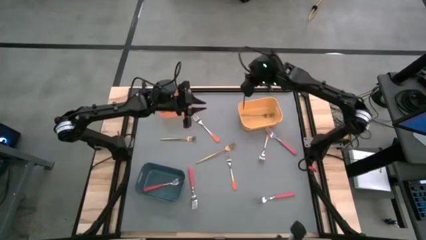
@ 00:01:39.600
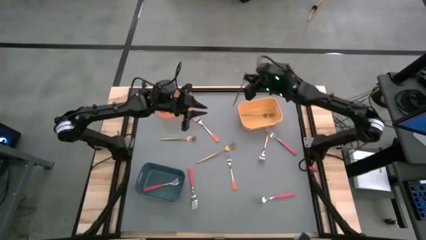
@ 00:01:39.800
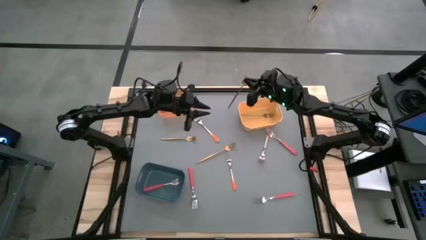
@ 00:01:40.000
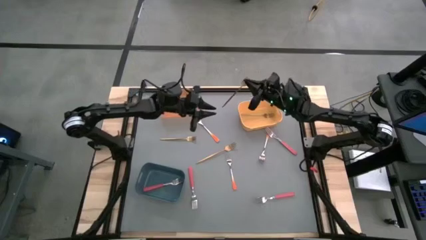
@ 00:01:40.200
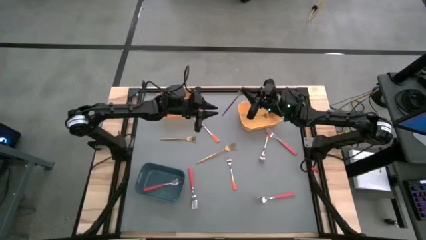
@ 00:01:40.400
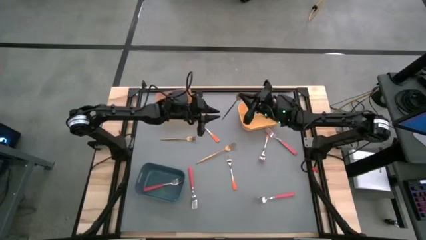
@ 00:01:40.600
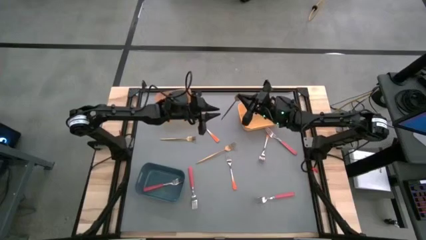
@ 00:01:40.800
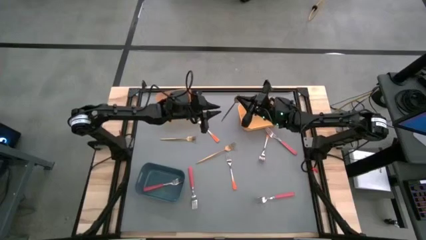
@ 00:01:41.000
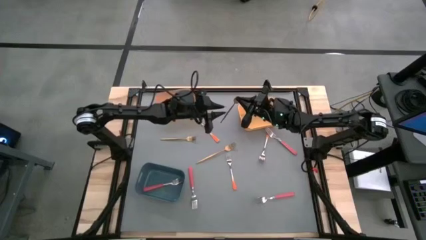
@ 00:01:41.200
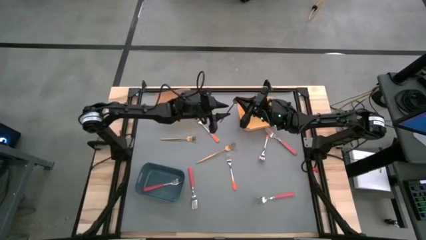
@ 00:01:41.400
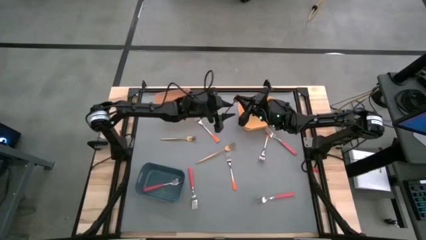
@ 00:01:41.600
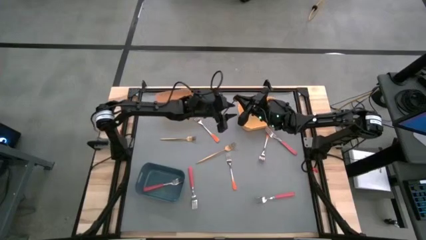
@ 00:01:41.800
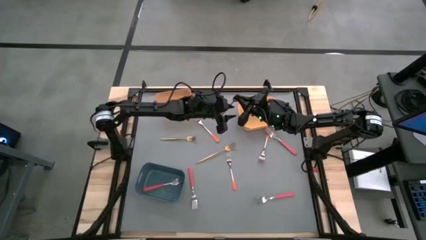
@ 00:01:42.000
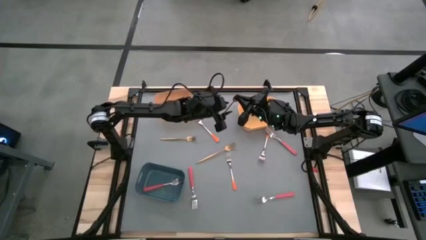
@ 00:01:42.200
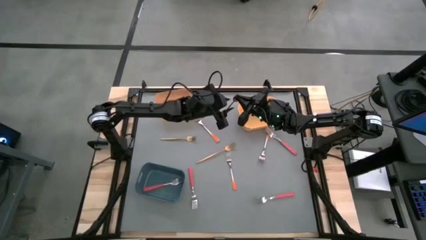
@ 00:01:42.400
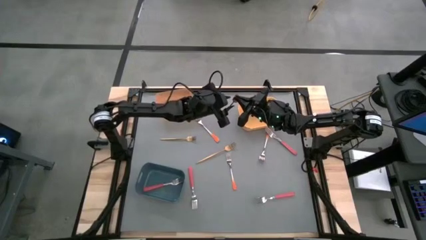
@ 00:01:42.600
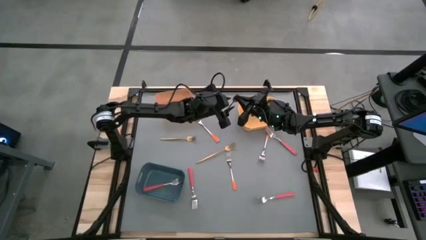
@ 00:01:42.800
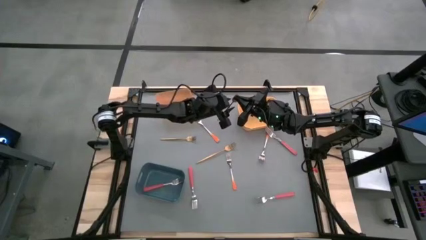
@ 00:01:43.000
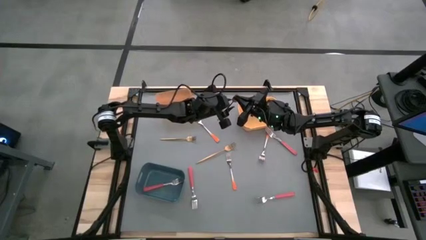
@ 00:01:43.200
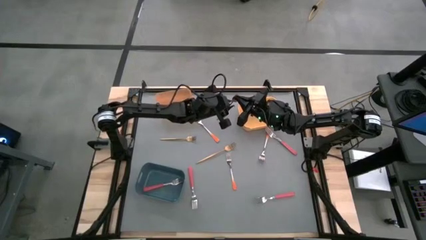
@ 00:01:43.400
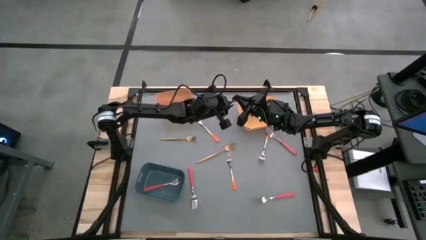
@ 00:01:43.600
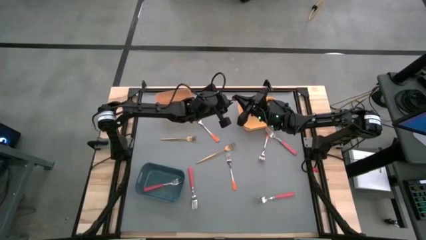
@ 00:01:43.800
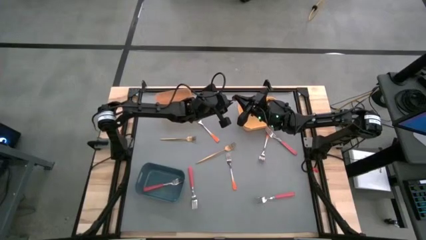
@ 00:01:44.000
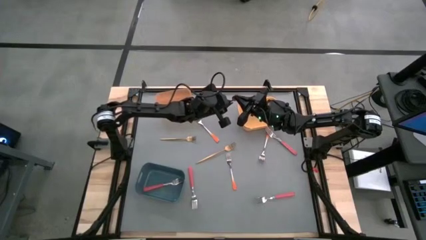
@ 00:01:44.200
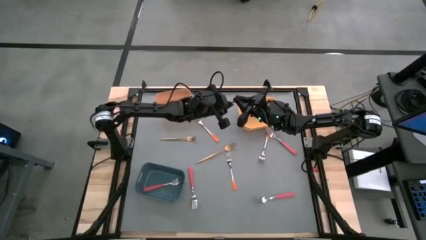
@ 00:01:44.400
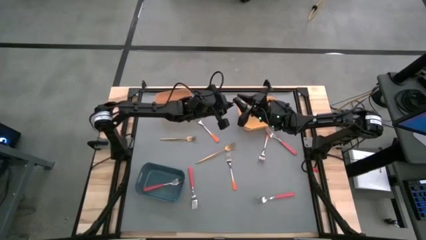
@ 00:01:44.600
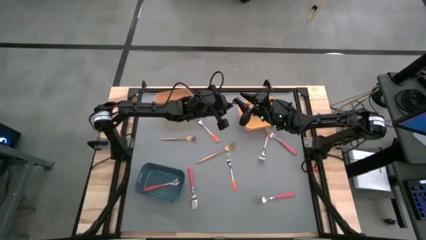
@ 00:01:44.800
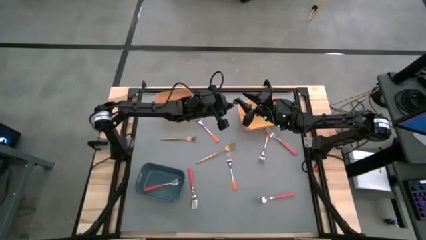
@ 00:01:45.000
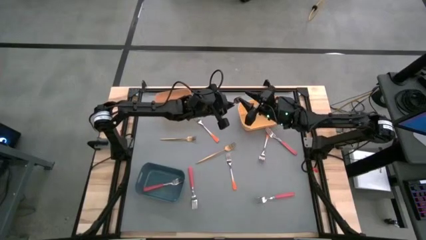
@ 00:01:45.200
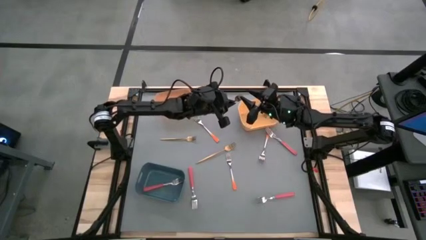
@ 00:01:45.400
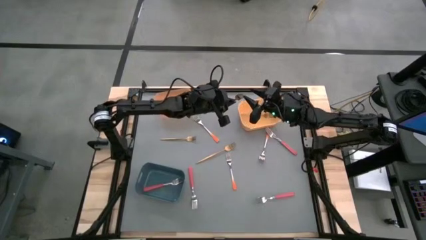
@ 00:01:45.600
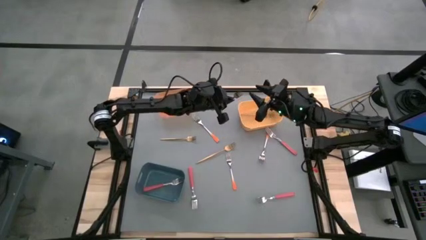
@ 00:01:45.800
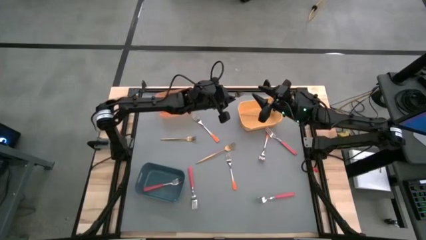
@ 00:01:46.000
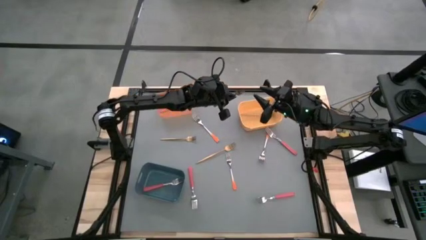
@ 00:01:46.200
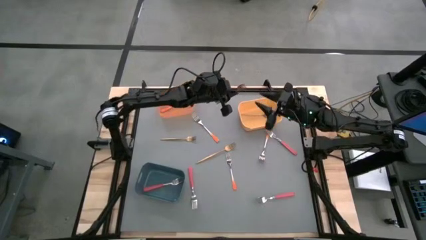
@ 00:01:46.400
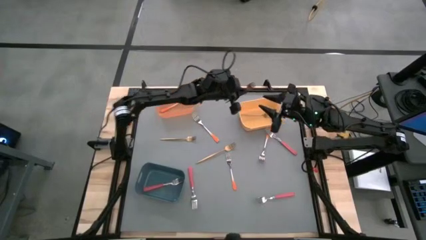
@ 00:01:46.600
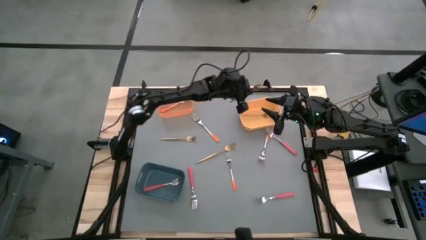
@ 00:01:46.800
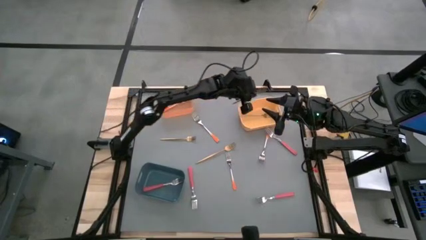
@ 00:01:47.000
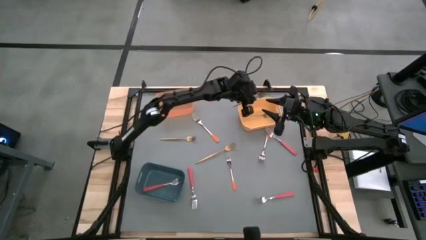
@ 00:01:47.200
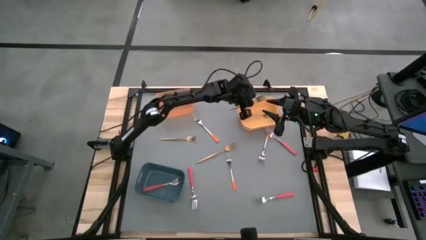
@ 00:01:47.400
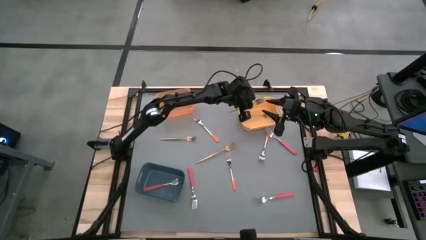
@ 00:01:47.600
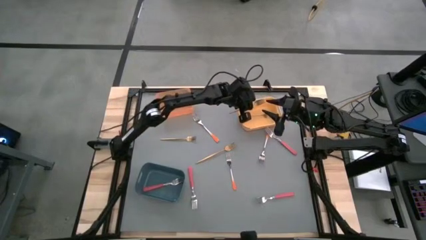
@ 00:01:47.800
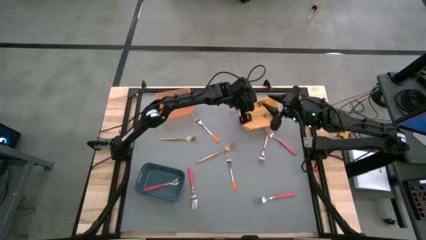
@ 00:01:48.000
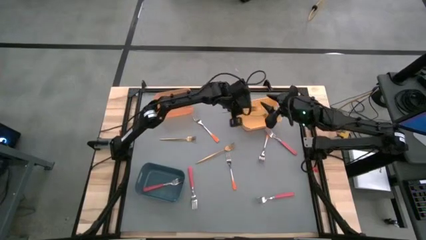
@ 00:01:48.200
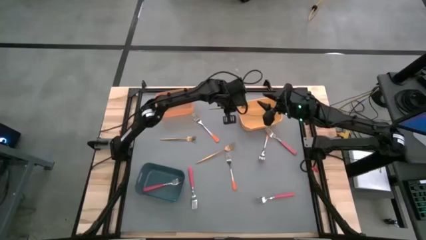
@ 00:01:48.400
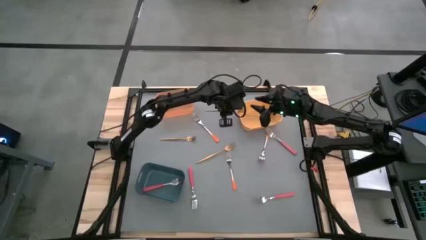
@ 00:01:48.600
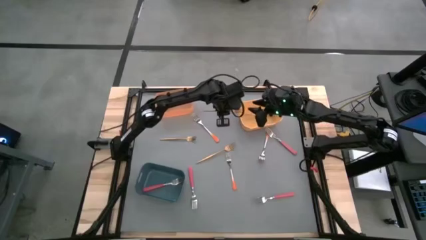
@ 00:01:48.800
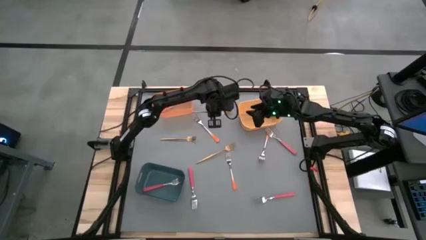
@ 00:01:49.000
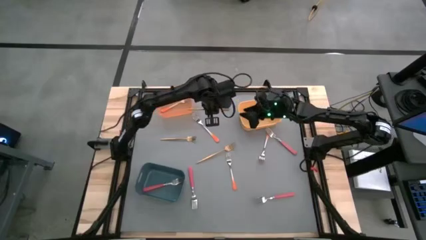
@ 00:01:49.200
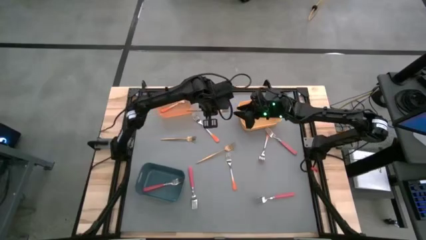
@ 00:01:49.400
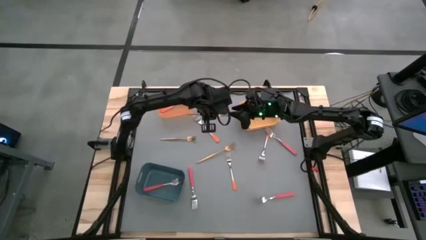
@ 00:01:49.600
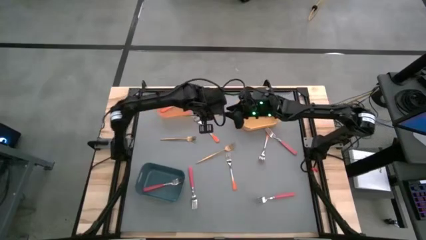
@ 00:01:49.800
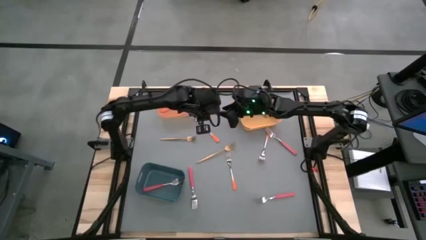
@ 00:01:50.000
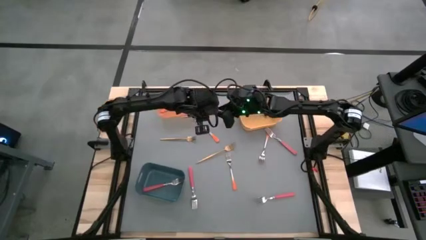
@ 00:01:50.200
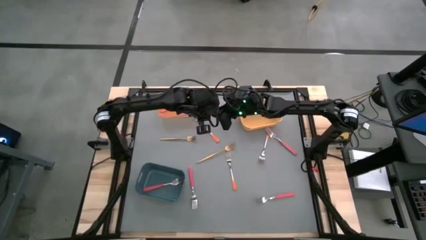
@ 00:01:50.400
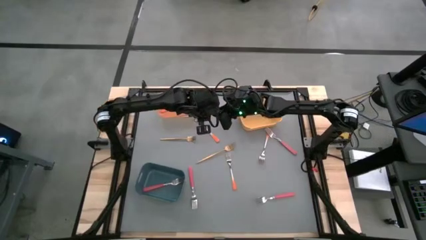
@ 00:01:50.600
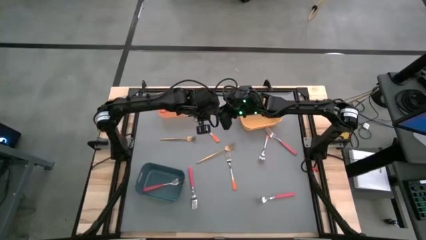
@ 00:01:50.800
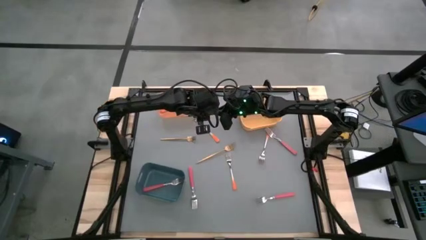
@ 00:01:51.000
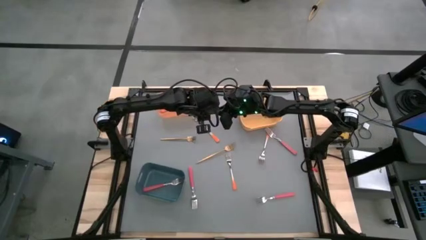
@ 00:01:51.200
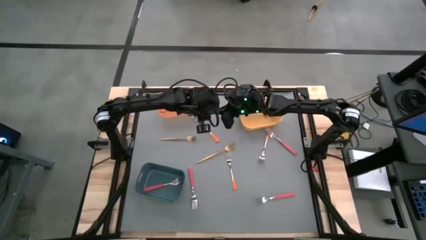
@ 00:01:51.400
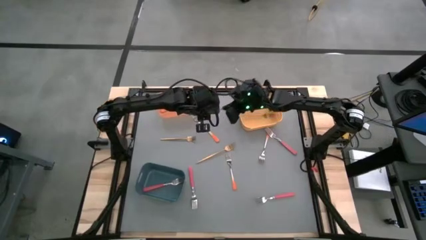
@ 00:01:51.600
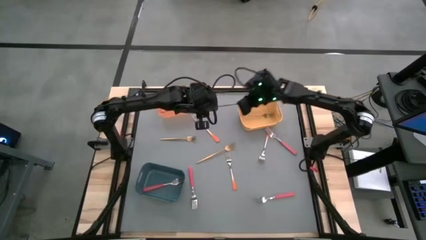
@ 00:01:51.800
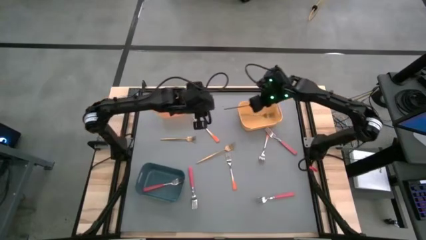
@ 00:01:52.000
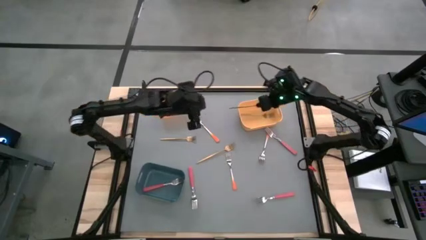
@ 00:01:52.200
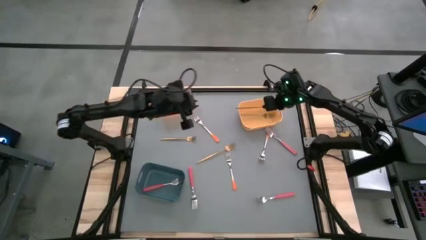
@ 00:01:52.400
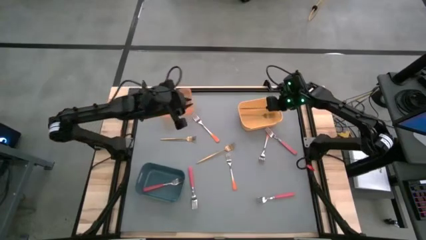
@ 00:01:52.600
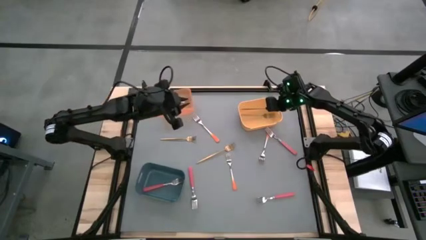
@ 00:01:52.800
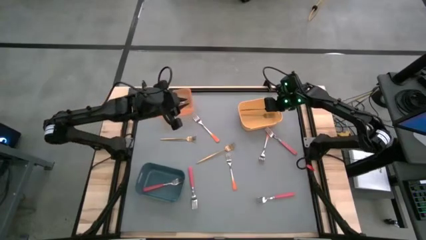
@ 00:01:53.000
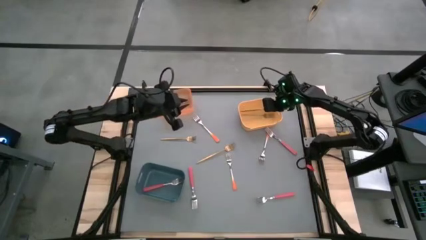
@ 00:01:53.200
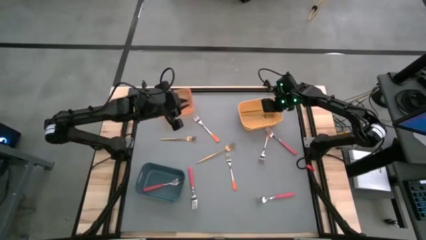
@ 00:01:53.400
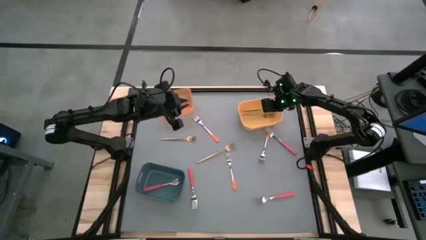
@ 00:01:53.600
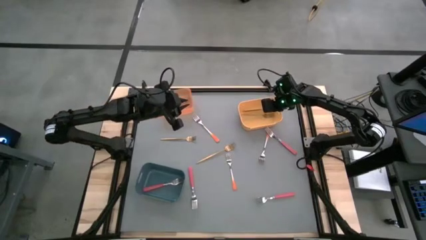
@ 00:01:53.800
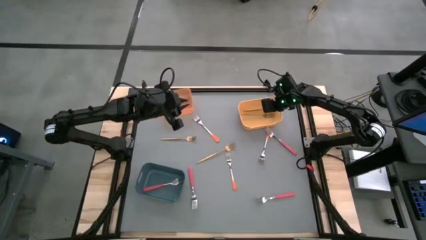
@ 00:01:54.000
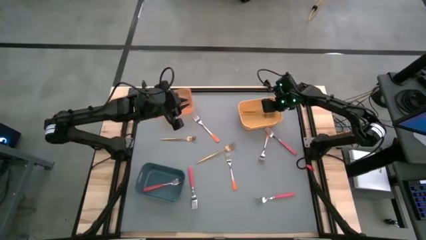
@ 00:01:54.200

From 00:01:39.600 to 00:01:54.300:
Task: Sort silverware by color (type)
Put the gold fork into the yellow bin
